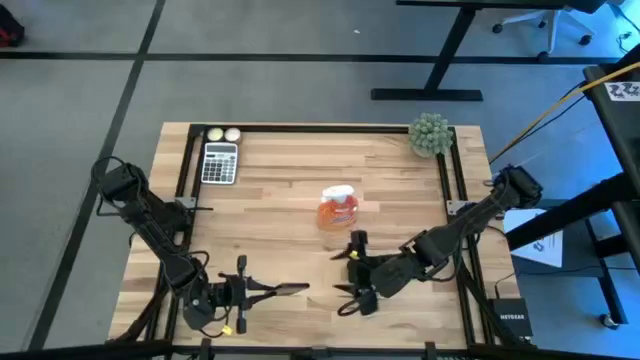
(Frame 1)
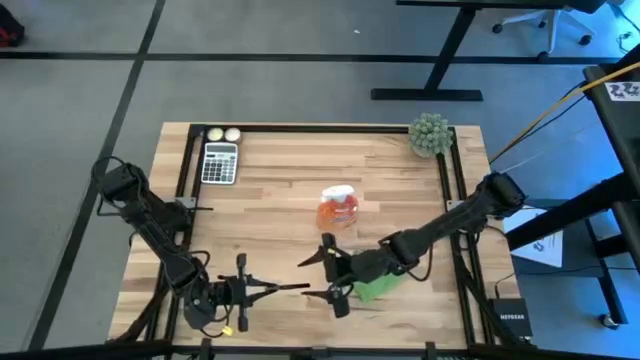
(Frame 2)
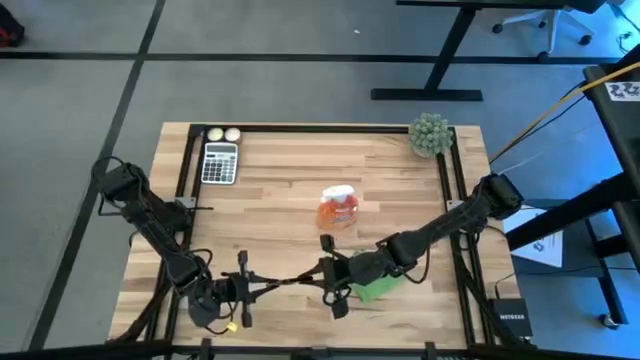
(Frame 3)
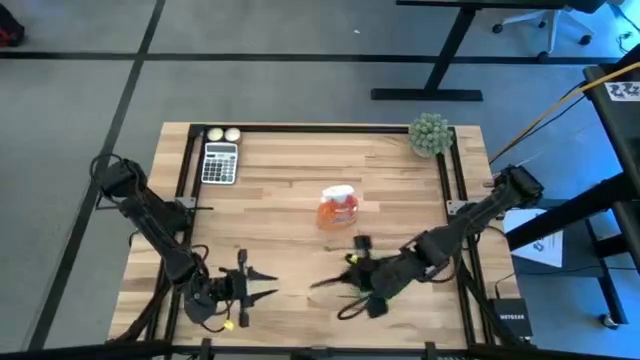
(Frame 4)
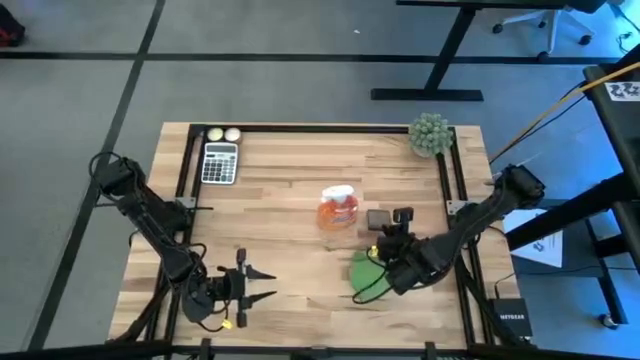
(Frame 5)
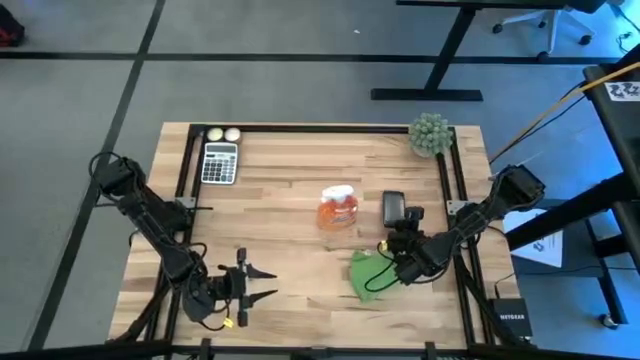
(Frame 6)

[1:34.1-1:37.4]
Task: Apply microfiber cloth
Put the black cellphone beside the spray bottle

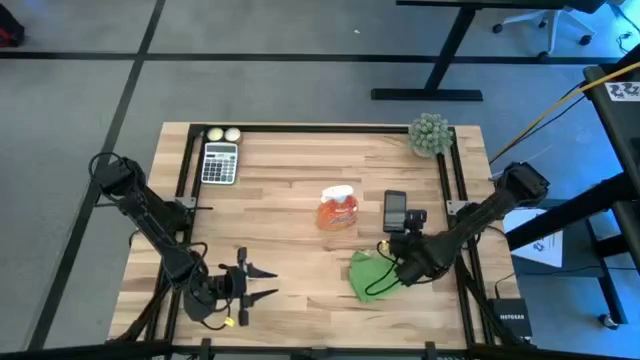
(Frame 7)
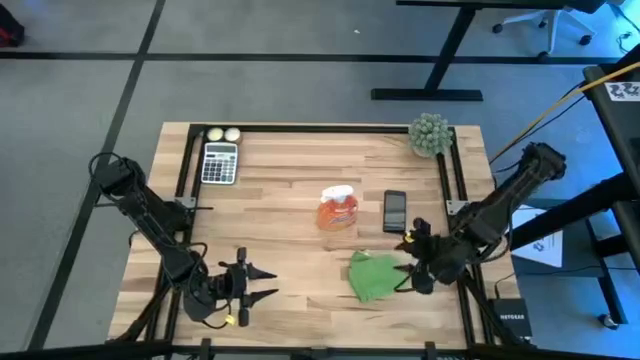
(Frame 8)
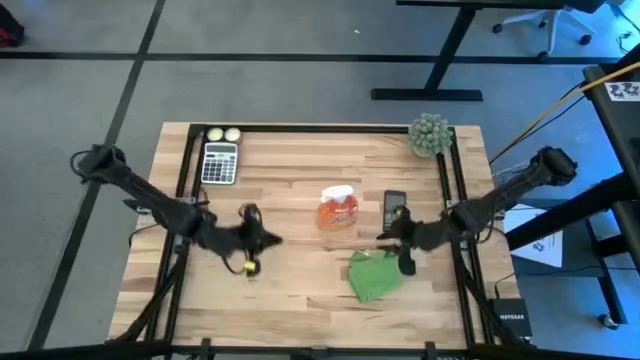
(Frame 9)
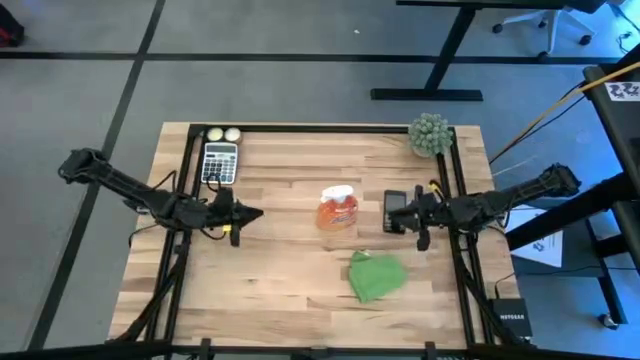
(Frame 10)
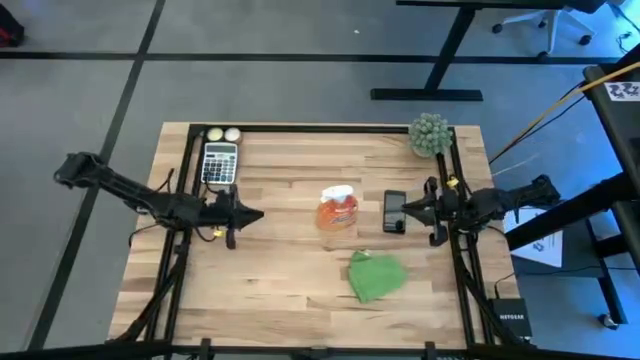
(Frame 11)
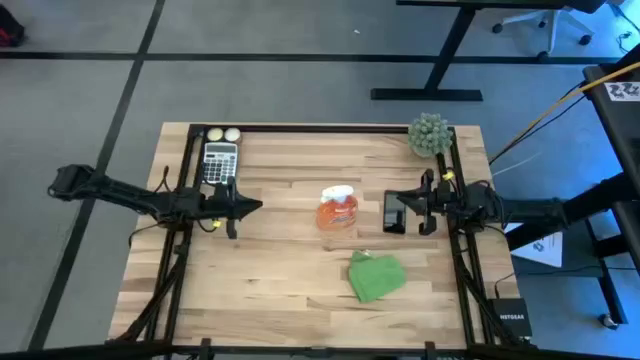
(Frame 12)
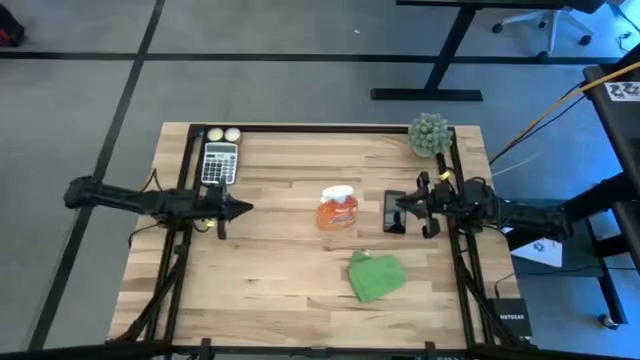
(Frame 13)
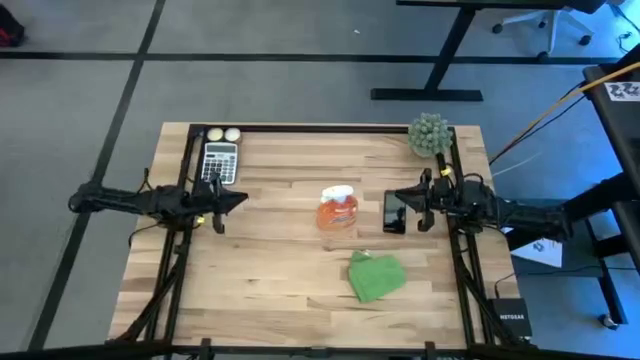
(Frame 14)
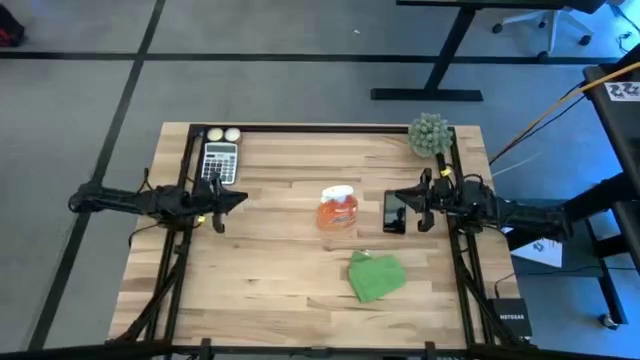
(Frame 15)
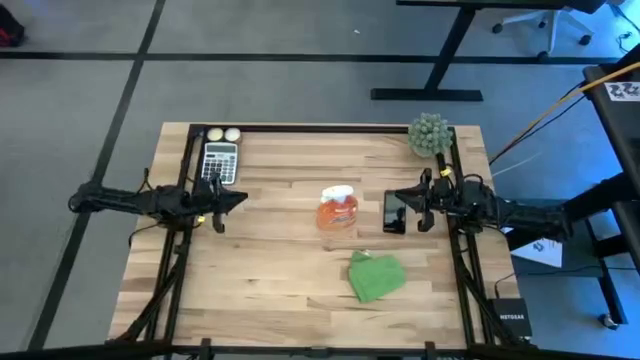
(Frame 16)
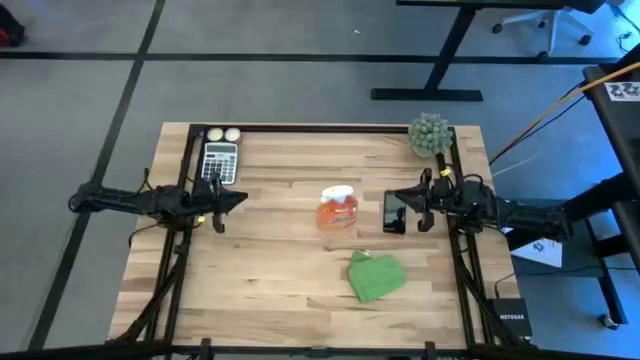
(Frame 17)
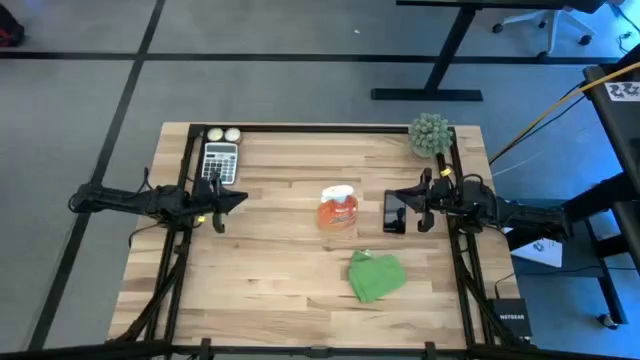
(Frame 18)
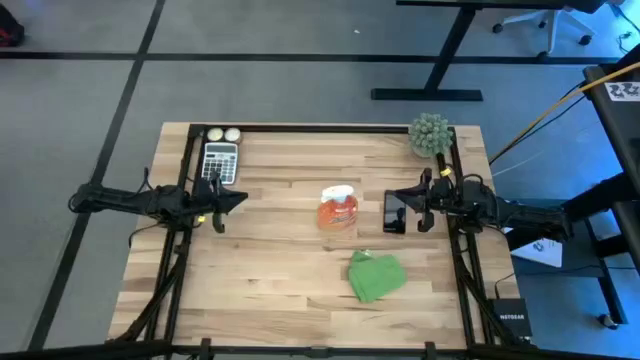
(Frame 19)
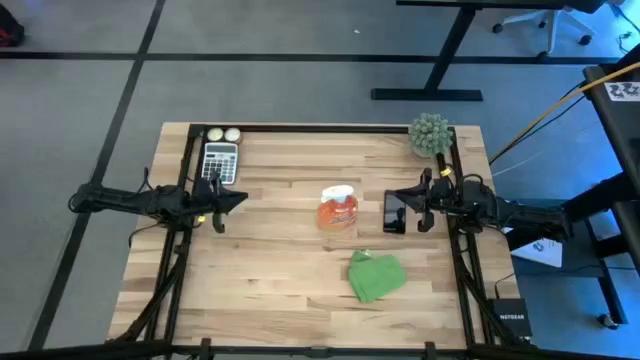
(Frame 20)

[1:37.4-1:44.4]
Return to Home Position

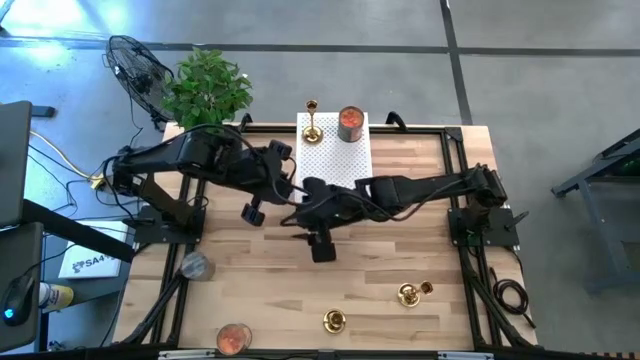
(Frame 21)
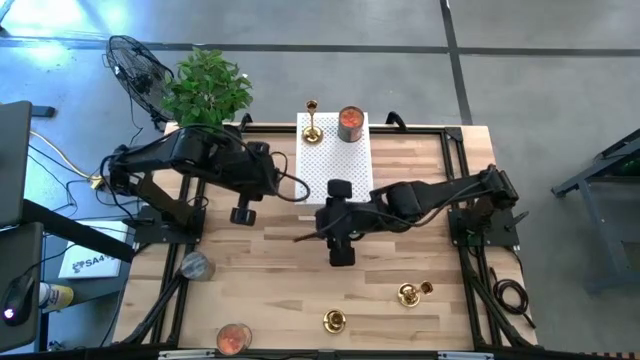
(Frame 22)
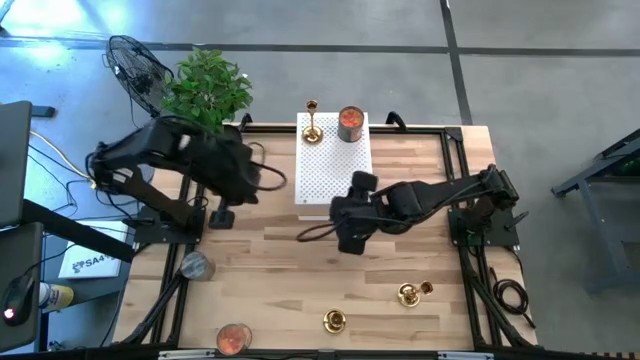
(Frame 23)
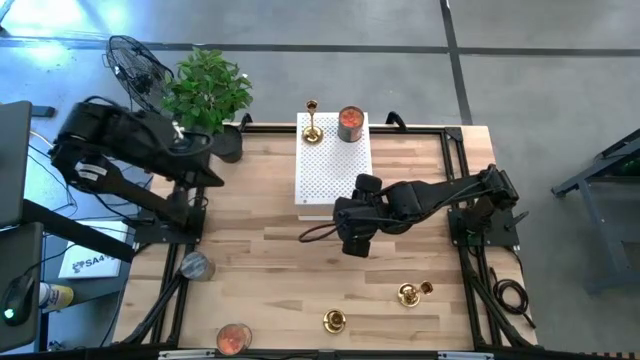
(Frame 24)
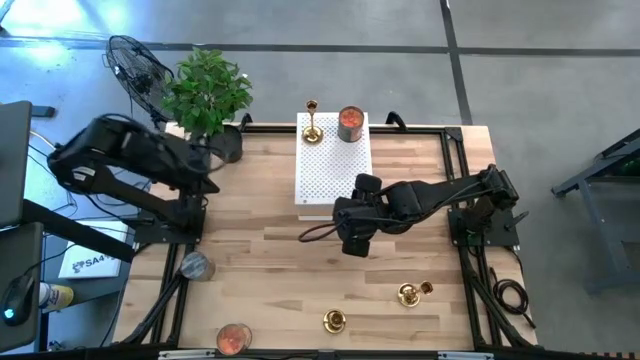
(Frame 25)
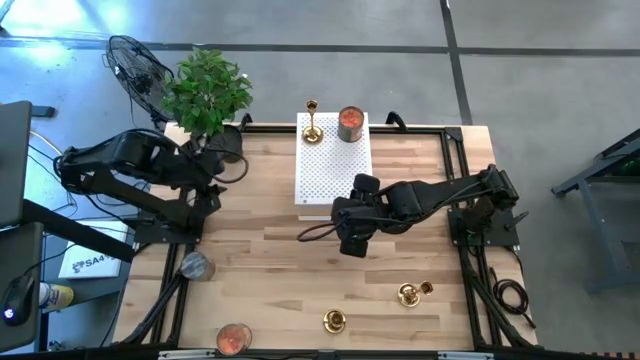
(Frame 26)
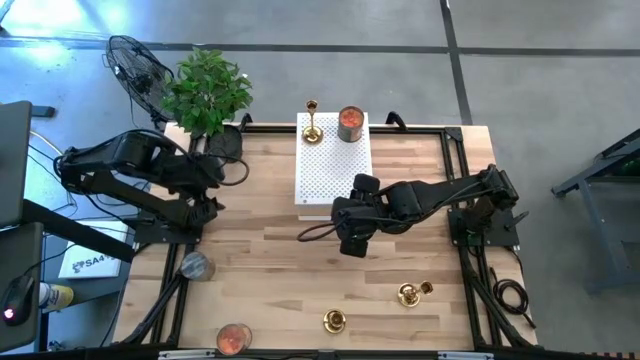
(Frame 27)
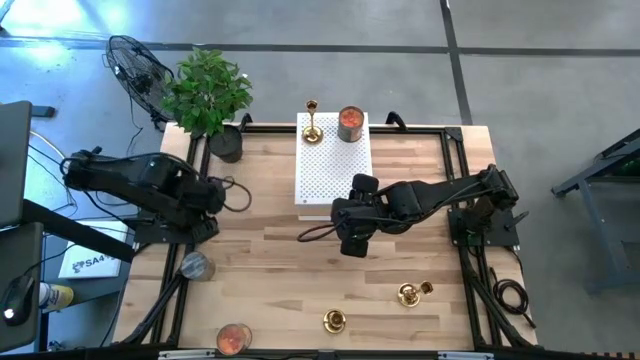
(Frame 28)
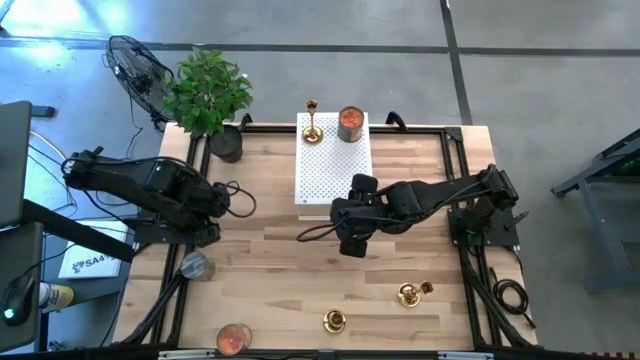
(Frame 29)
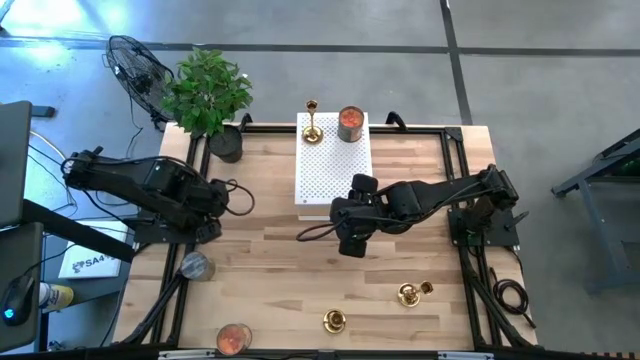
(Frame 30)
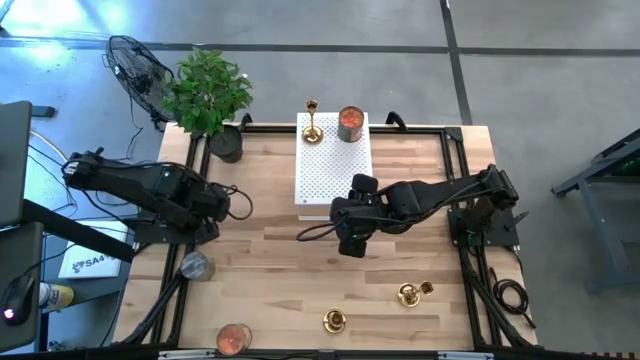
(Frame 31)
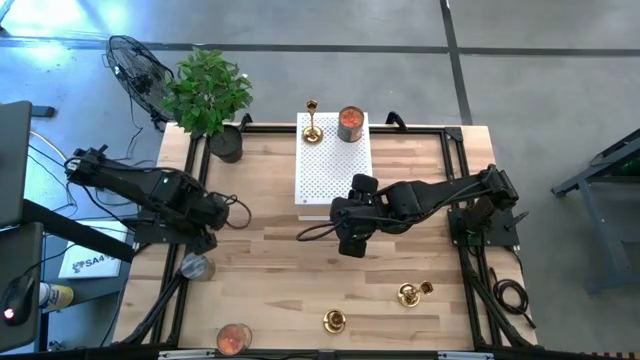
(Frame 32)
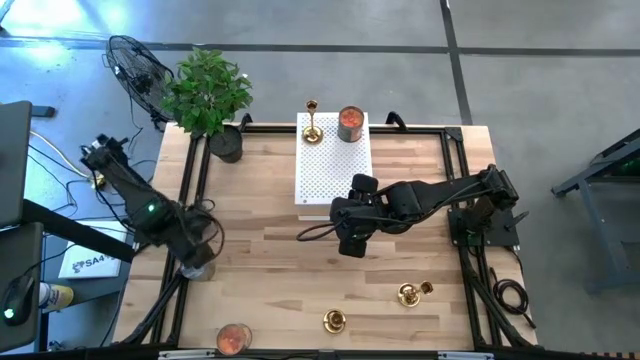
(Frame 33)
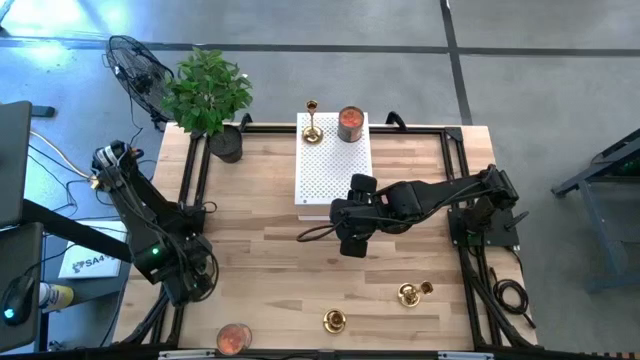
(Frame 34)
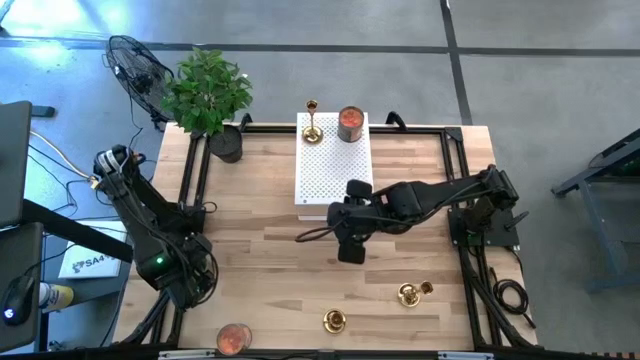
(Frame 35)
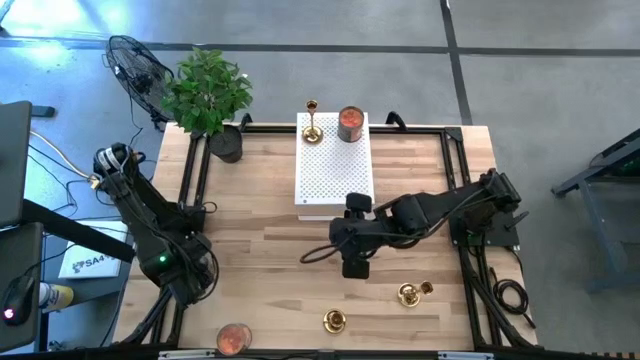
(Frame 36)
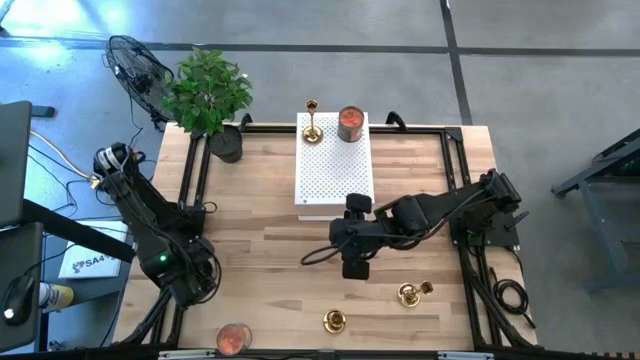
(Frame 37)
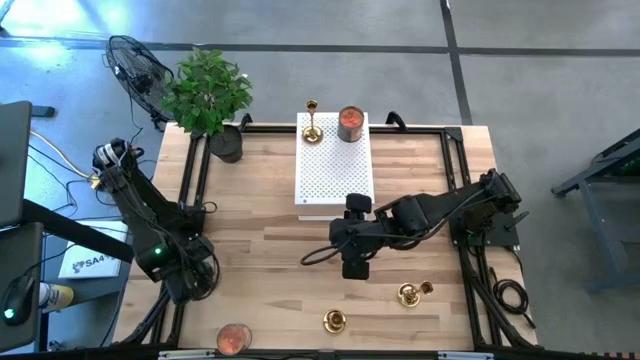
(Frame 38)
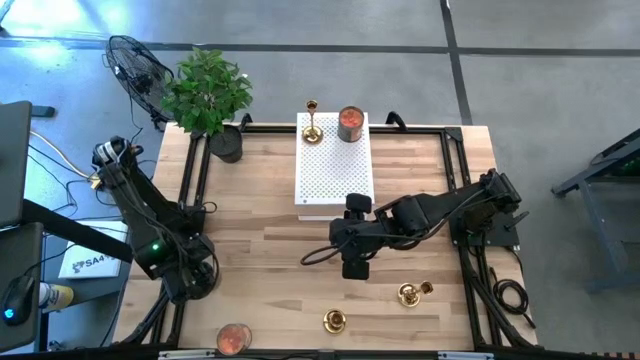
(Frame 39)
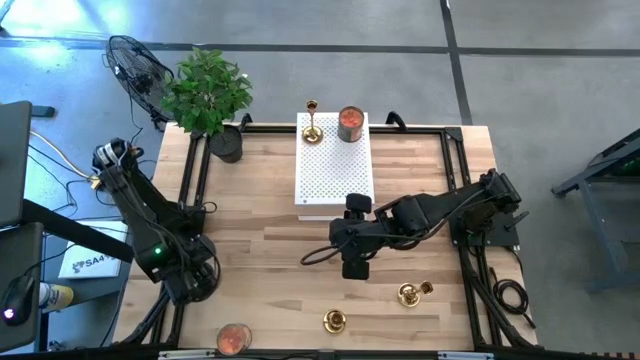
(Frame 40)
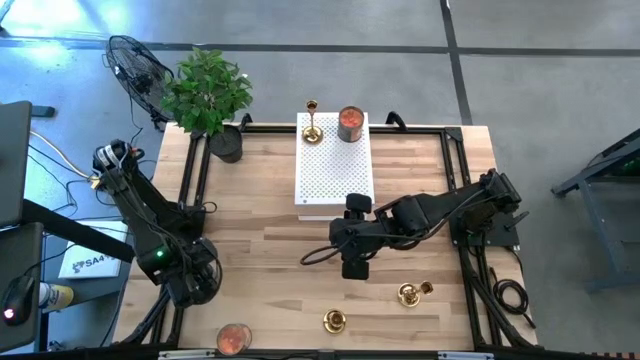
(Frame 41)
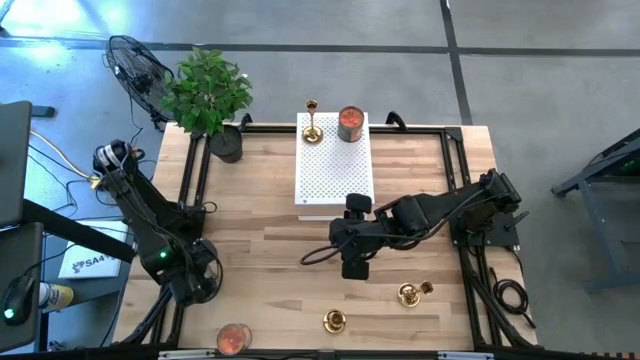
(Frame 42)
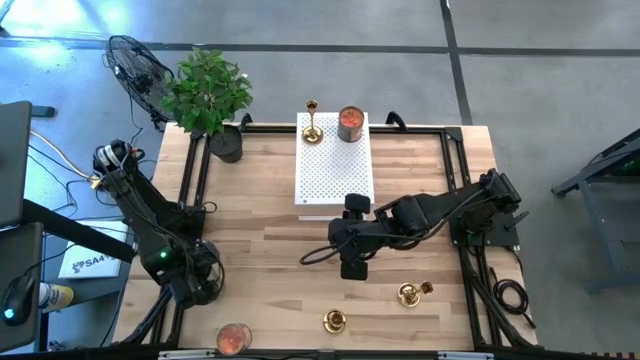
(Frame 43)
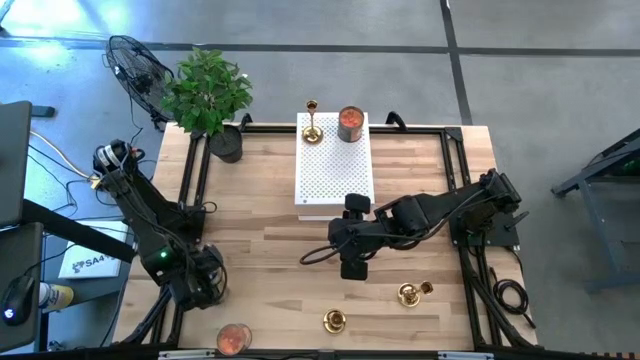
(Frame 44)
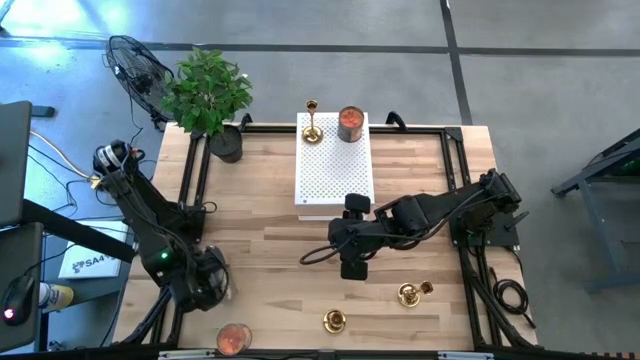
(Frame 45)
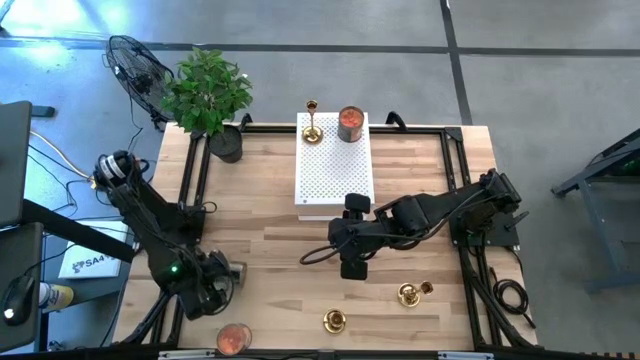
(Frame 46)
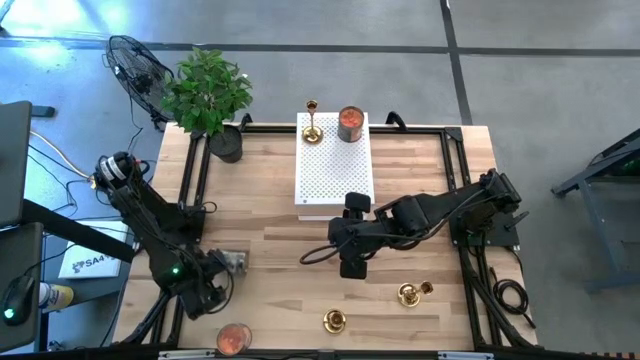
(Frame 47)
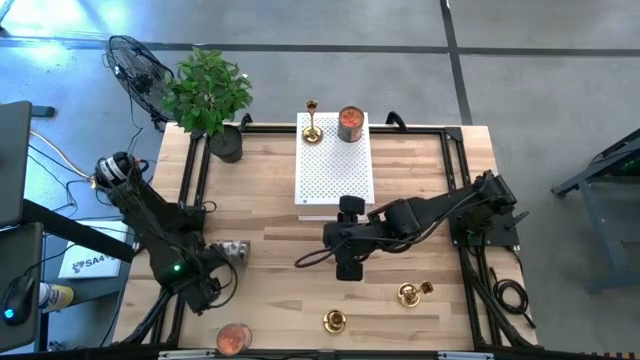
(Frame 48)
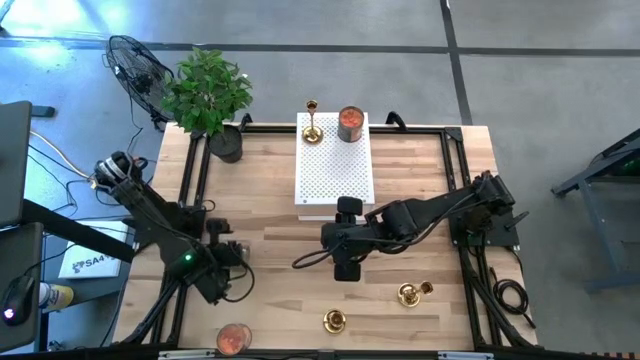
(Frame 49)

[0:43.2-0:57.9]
Task: Pick & Place candle stick holders
Put the brown scented candle on the shelf
